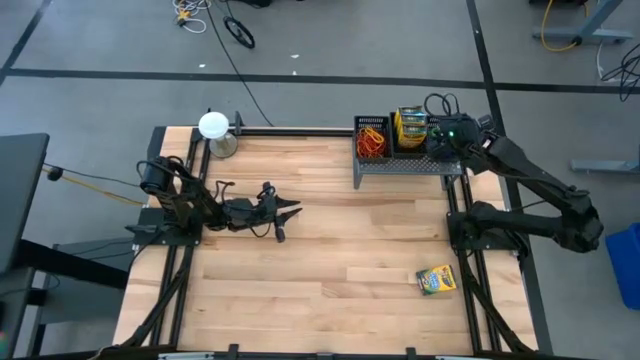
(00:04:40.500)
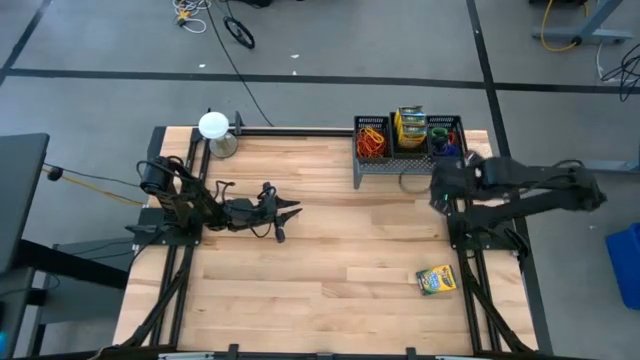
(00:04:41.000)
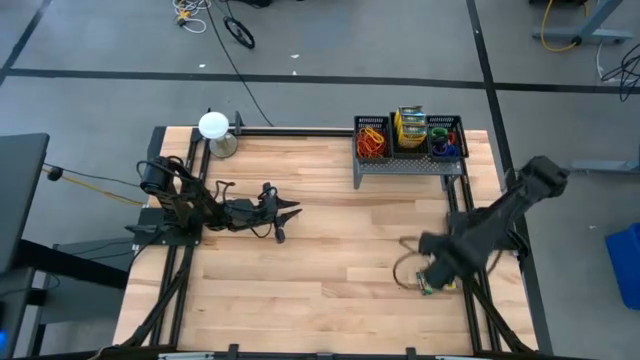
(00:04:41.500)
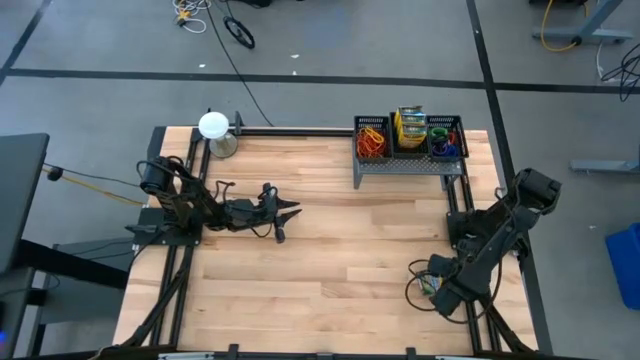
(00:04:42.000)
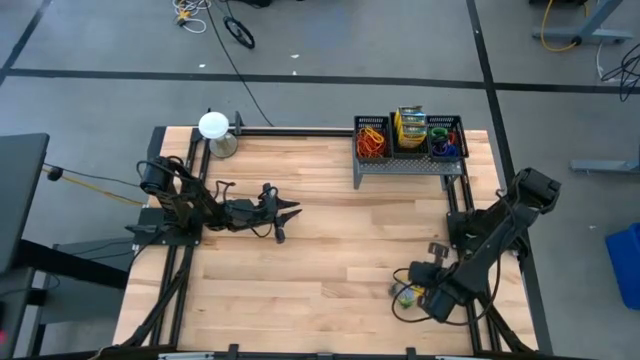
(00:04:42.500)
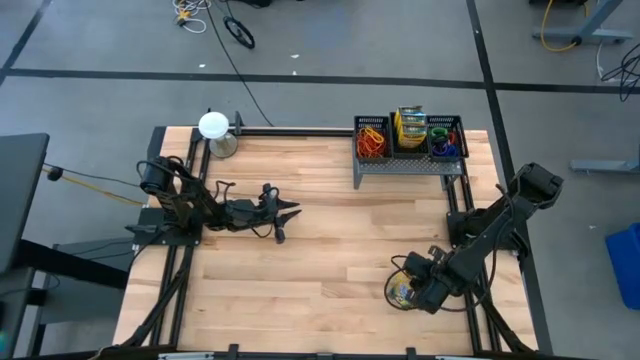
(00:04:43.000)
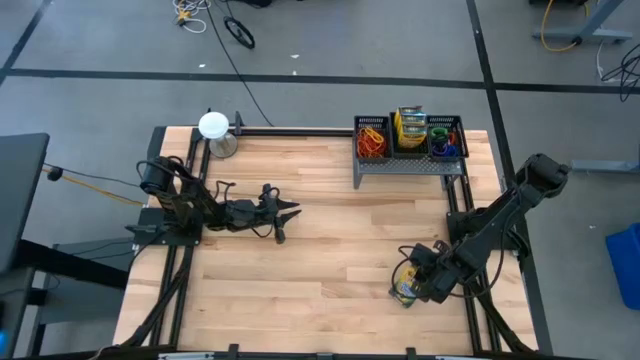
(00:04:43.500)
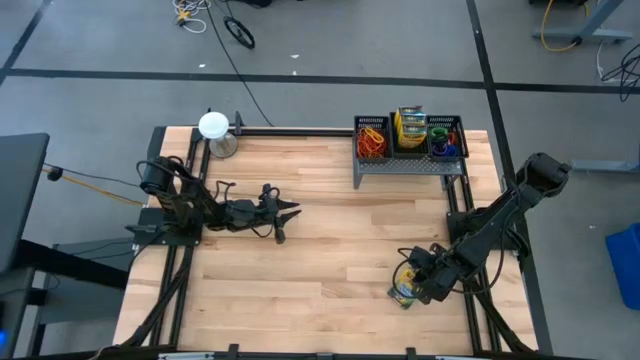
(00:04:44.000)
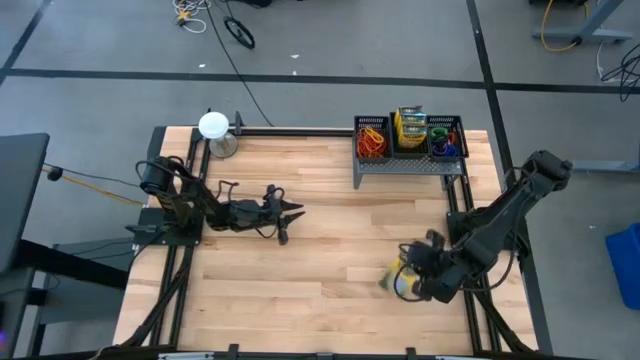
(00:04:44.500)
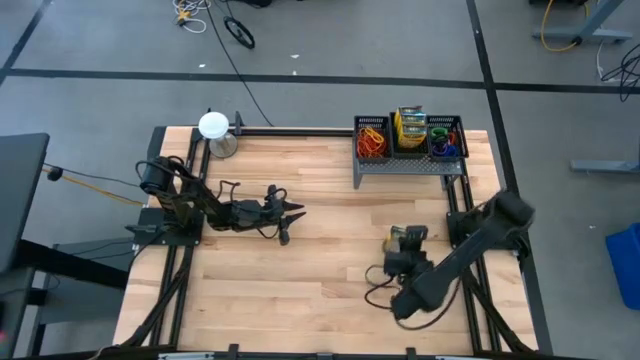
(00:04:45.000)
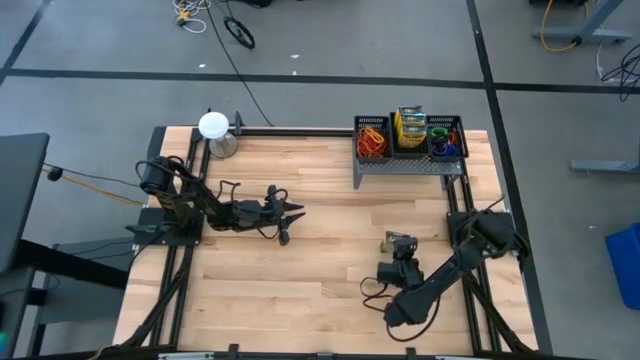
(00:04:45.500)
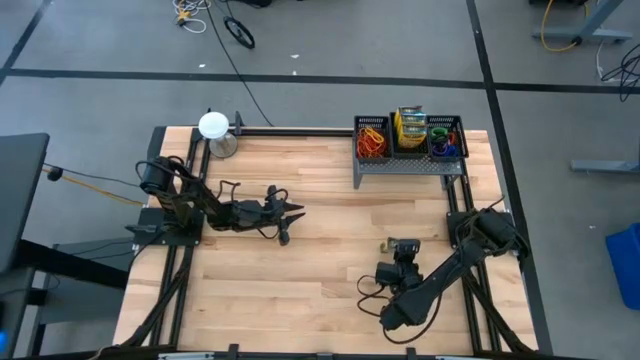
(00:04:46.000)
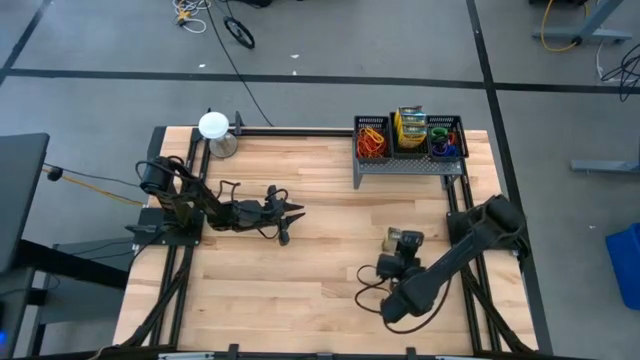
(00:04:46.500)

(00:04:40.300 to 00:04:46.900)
Task: Pick & Place Office Desk Supplies
Put the yellow crayon box into the middle black bin on the shelf

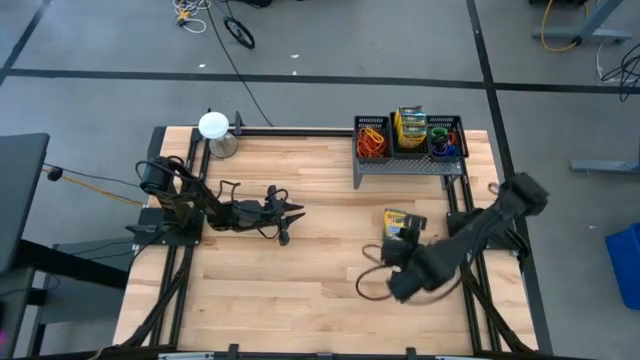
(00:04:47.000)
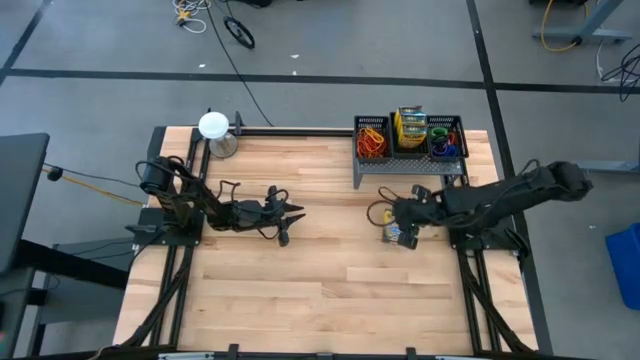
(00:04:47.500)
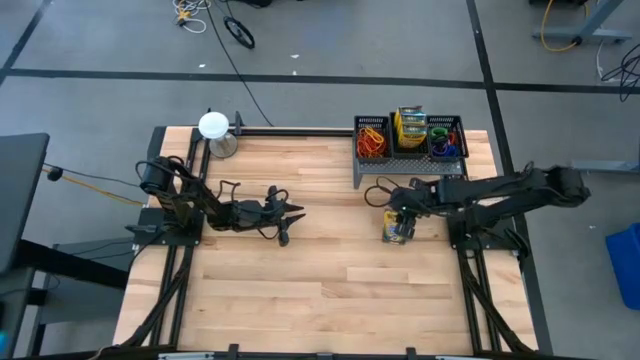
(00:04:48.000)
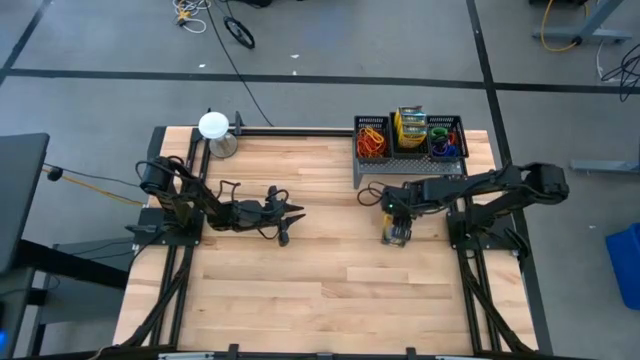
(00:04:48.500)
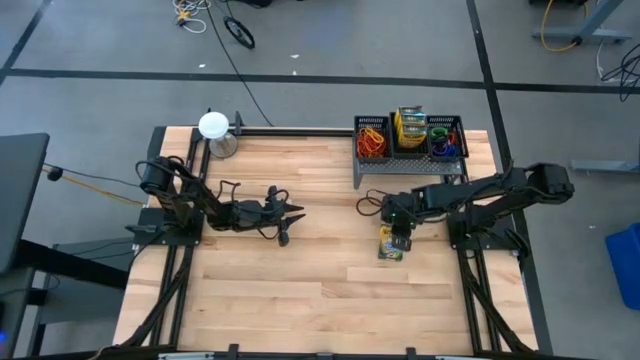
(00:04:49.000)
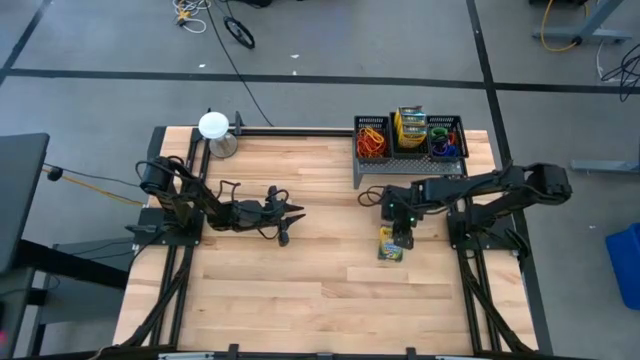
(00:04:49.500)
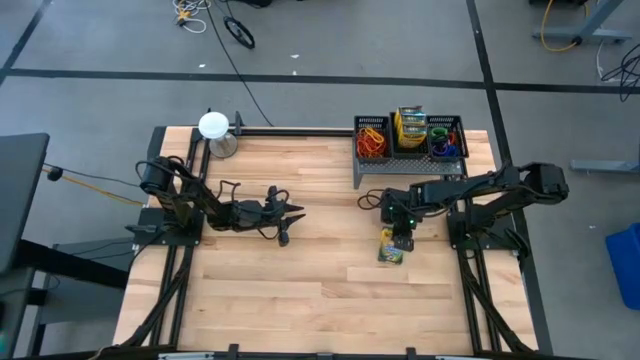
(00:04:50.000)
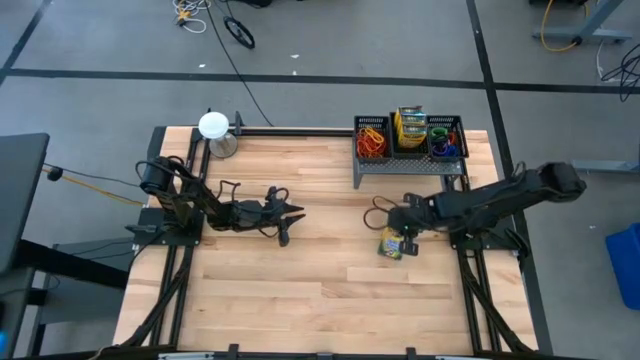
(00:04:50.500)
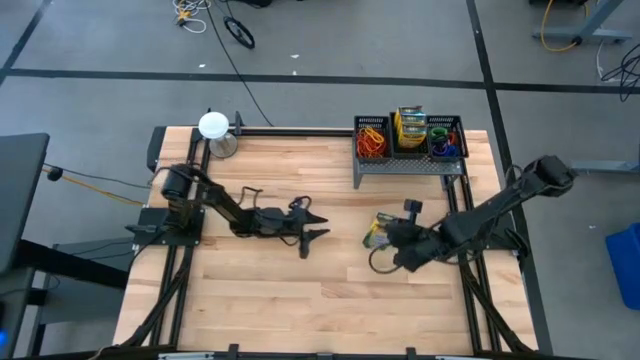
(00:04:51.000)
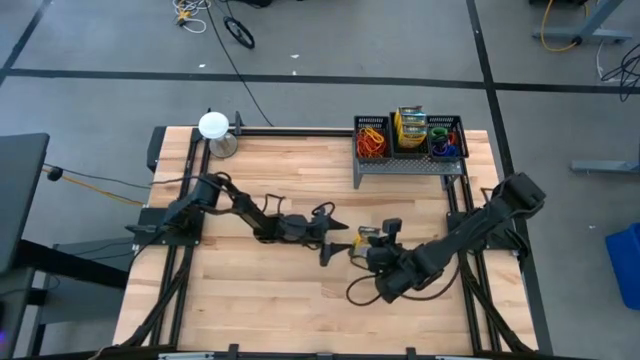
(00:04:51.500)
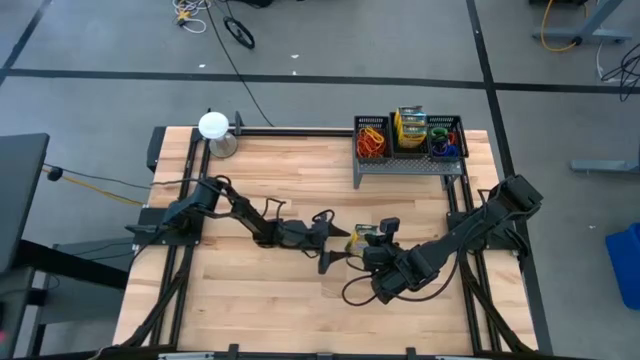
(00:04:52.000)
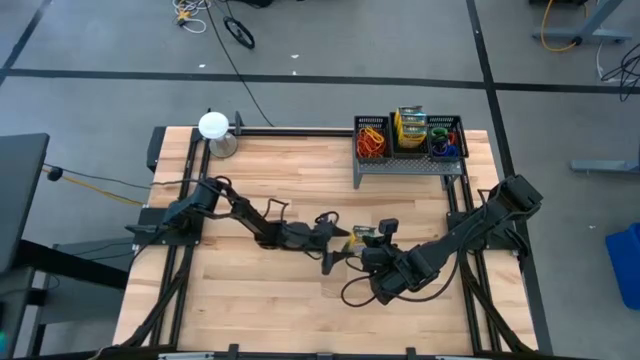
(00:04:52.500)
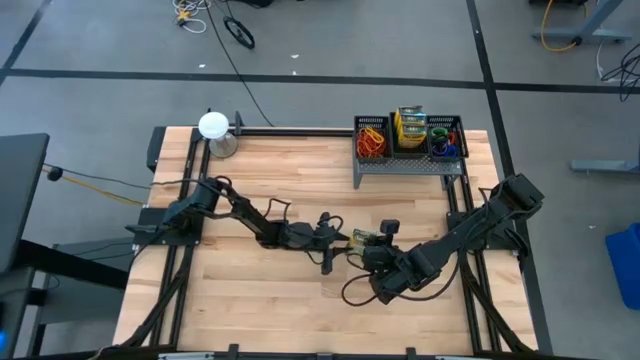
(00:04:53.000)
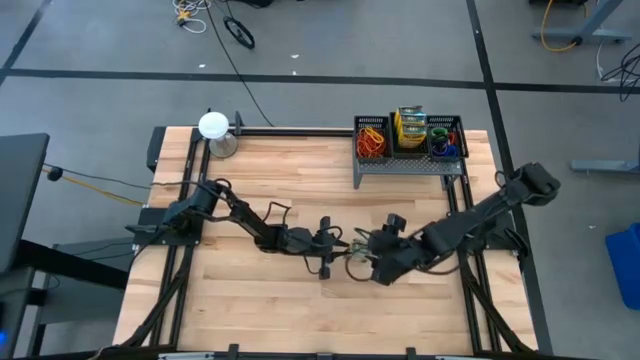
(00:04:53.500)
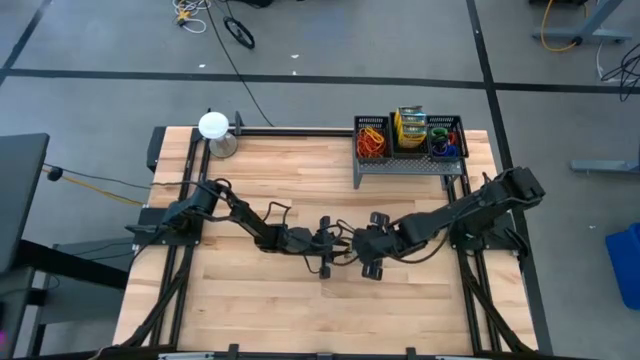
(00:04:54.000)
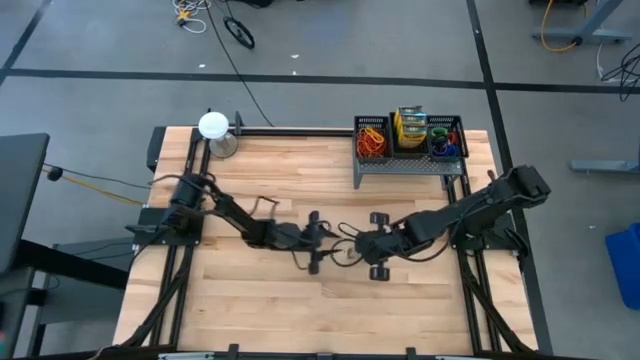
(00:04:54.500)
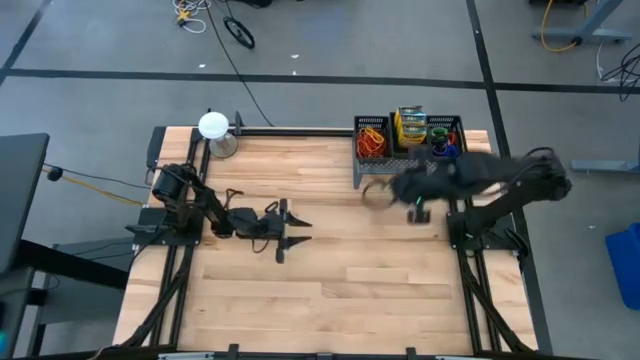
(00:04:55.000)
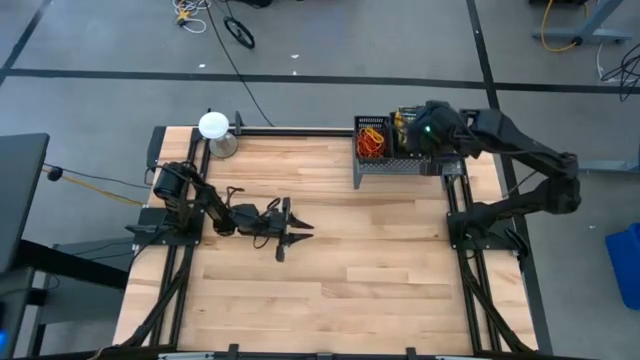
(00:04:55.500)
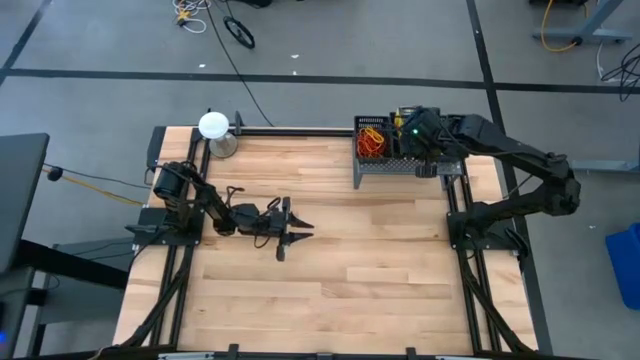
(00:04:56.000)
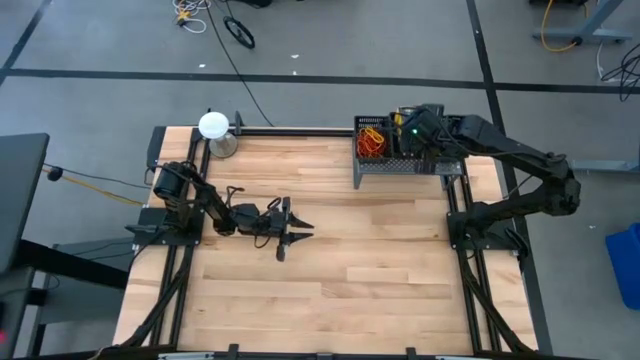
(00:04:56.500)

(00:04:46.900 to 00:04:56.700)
Put the yellow crayon box into the middle black bin on the shelf

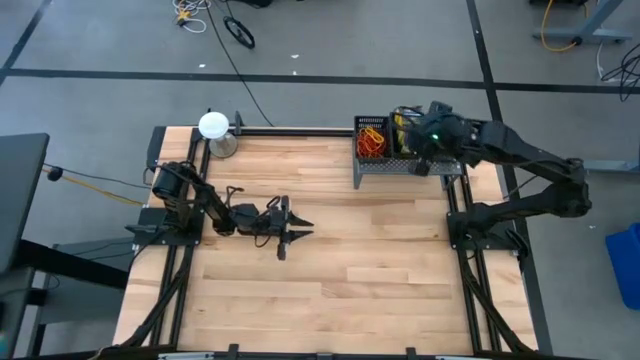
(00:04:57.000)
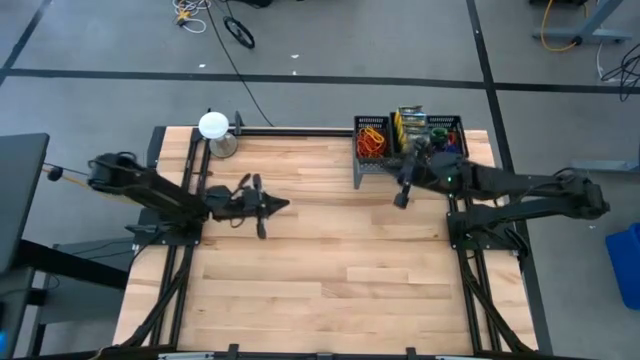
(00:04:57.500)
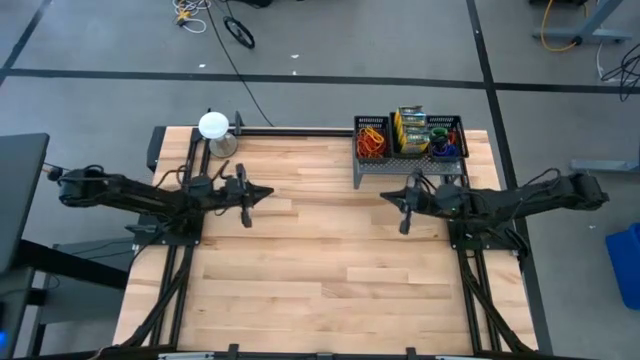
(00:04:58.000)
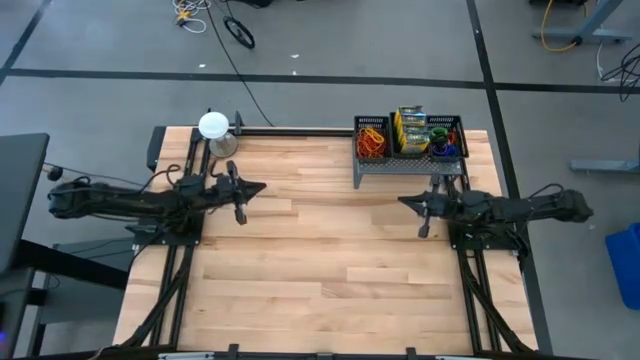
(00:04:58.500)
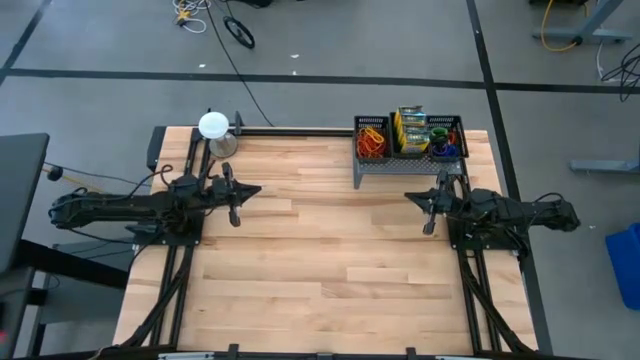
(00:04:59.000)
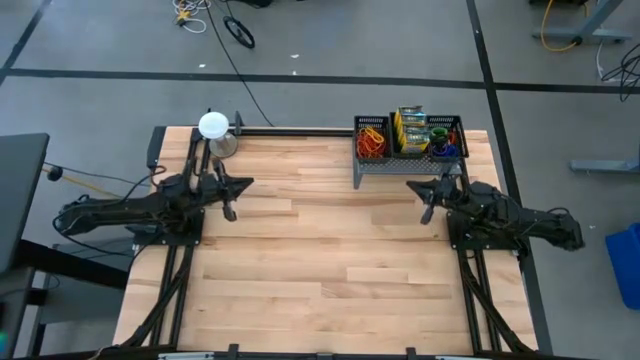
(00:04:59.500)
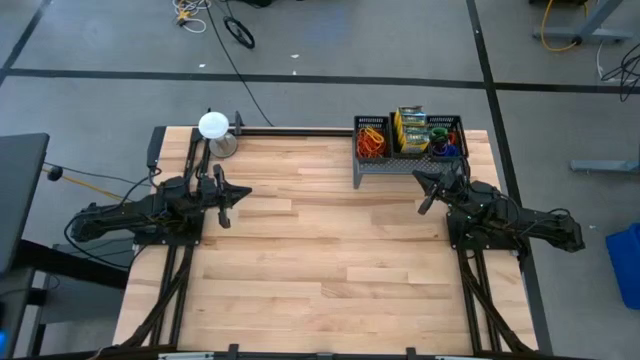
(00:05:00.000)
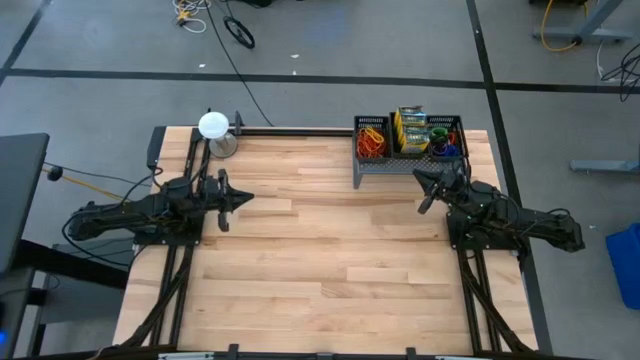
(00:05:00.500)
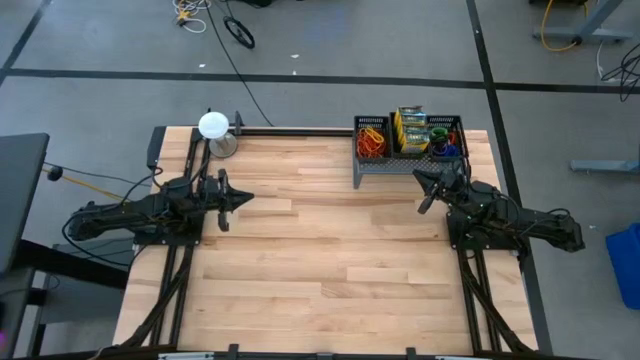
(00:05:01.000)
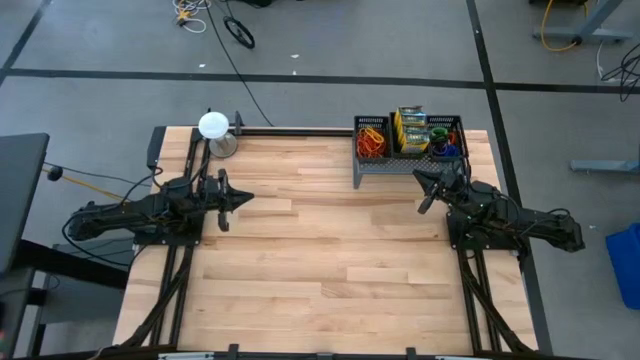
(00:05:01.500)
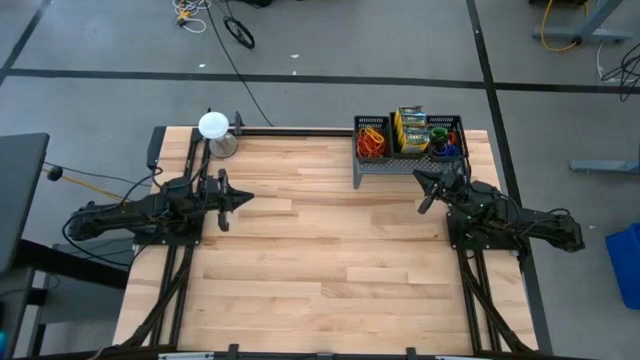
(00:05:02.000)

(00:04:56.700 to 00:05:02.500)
Return to Home Position
